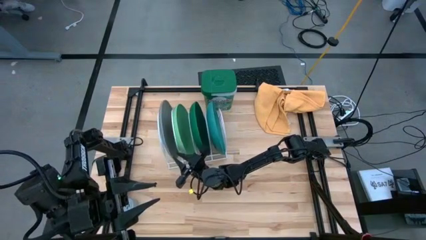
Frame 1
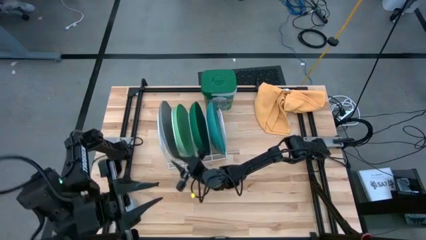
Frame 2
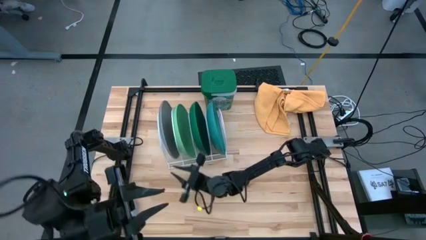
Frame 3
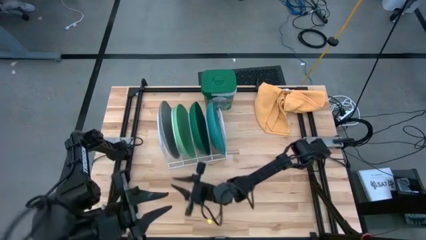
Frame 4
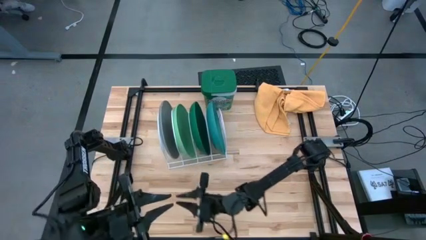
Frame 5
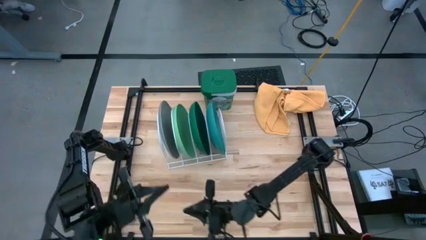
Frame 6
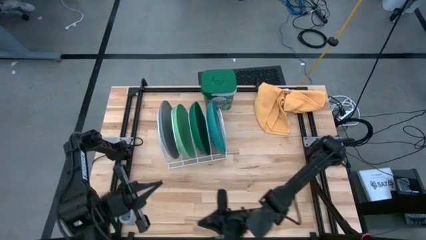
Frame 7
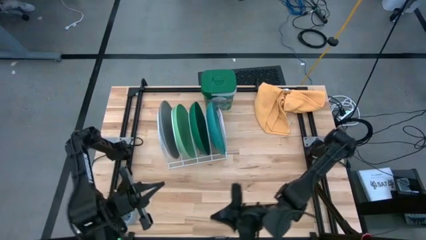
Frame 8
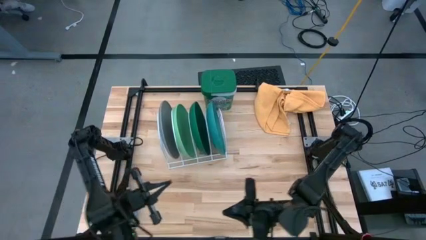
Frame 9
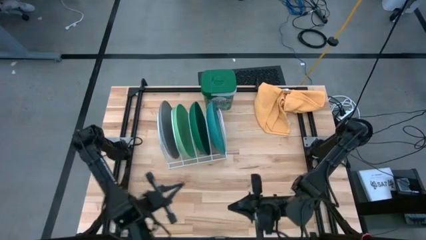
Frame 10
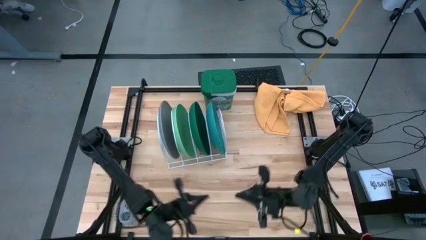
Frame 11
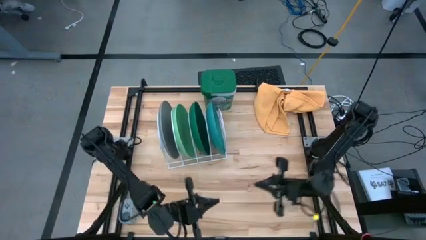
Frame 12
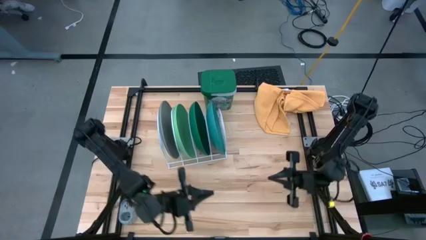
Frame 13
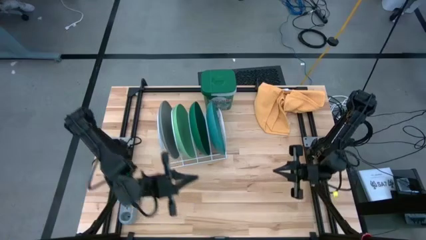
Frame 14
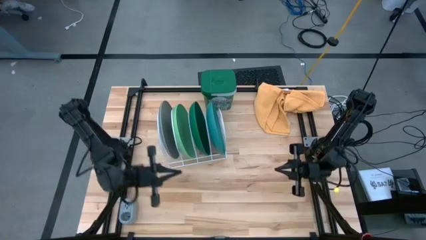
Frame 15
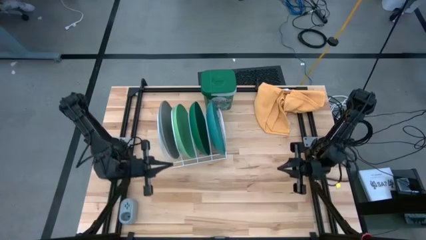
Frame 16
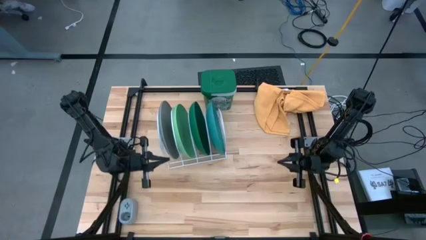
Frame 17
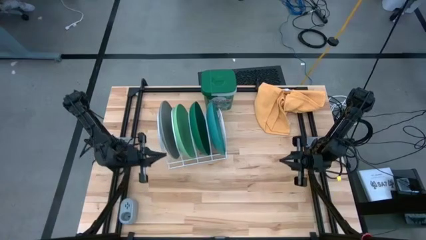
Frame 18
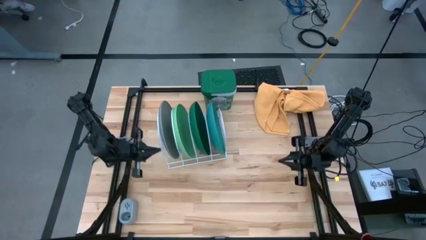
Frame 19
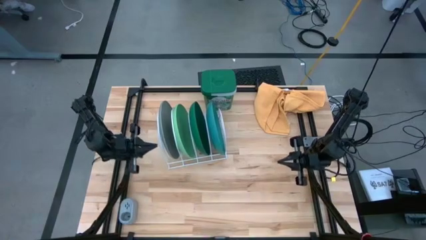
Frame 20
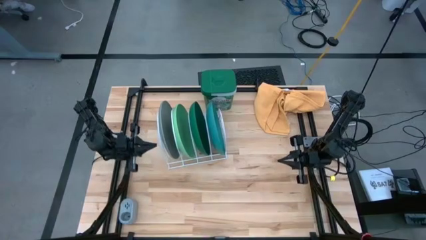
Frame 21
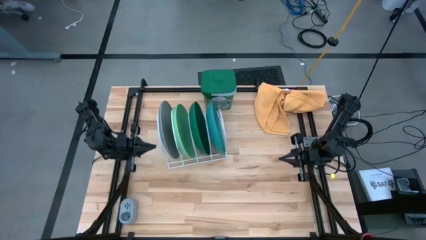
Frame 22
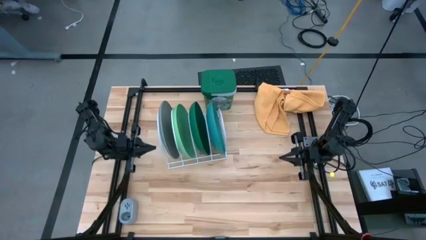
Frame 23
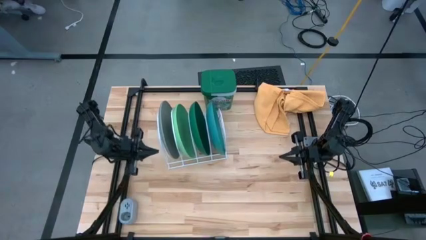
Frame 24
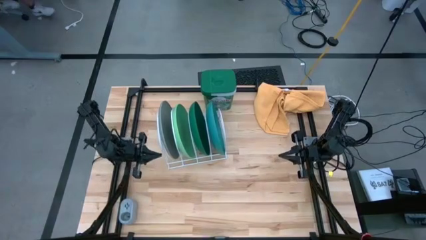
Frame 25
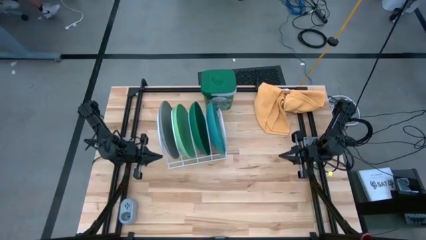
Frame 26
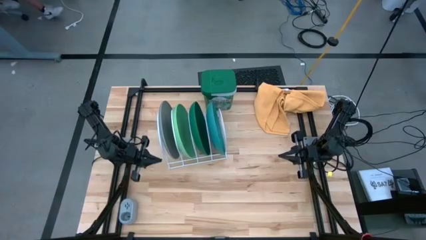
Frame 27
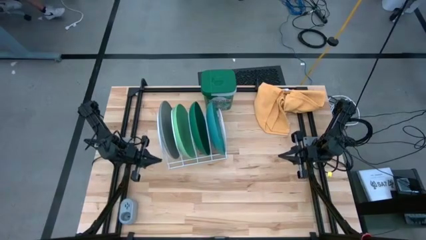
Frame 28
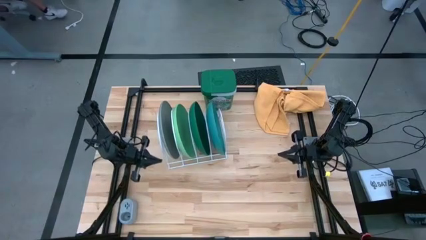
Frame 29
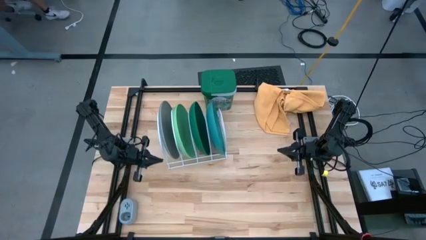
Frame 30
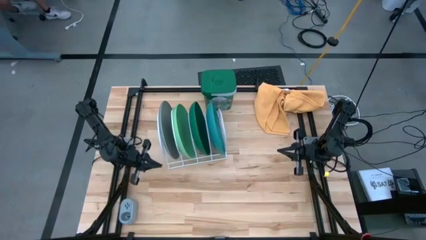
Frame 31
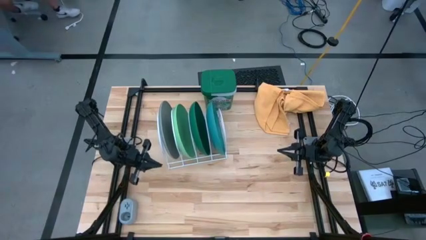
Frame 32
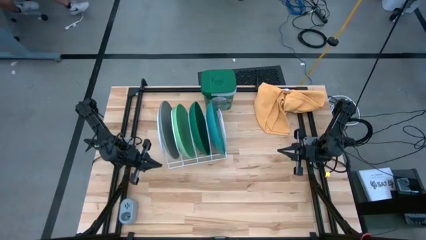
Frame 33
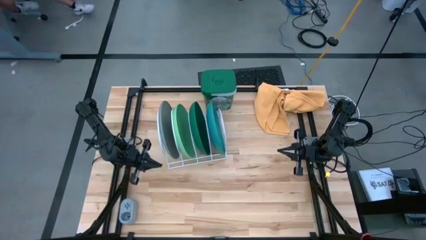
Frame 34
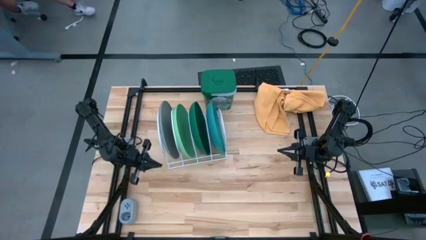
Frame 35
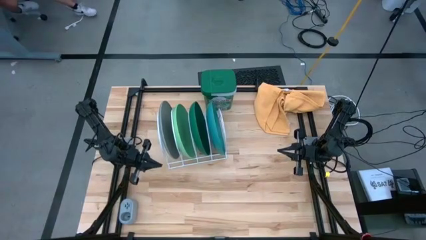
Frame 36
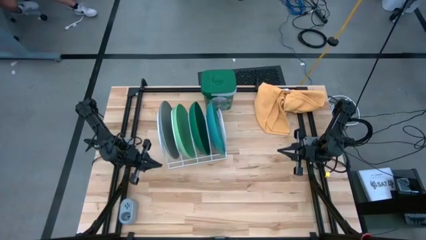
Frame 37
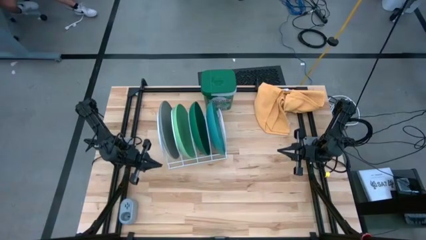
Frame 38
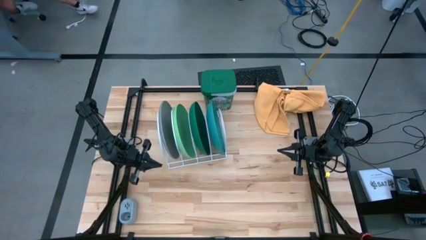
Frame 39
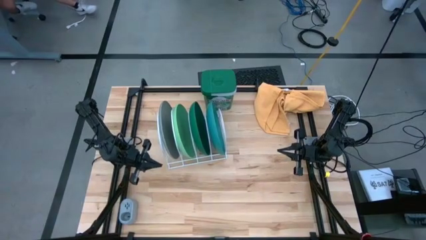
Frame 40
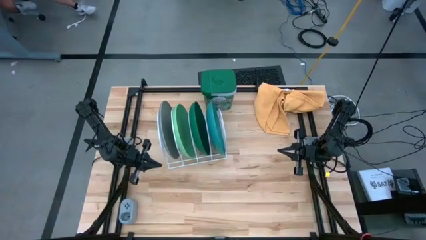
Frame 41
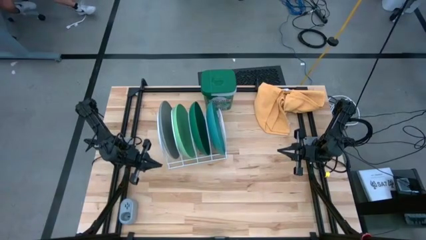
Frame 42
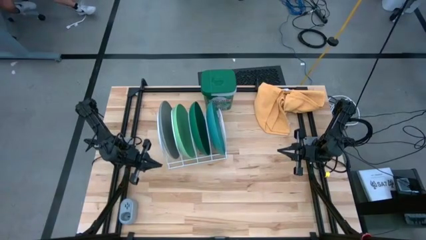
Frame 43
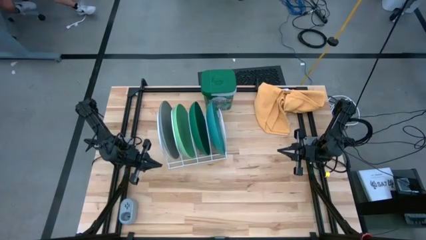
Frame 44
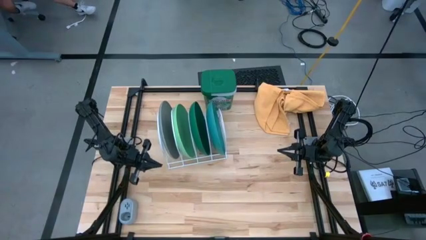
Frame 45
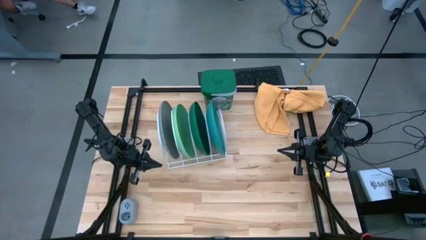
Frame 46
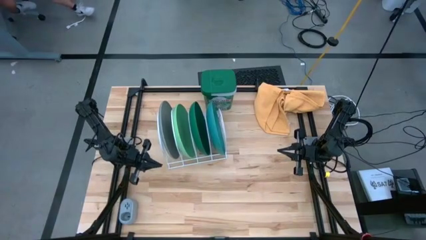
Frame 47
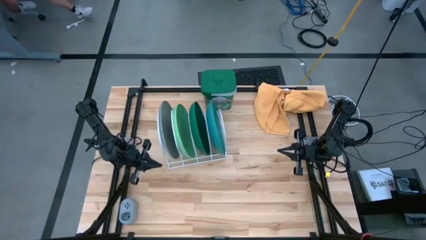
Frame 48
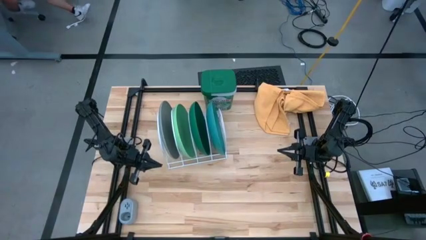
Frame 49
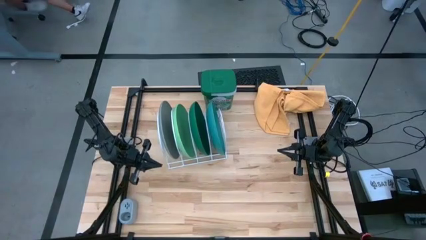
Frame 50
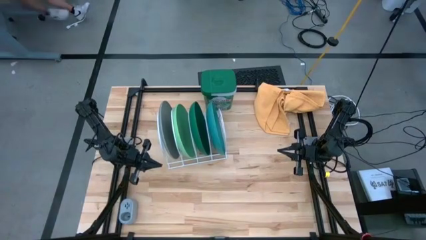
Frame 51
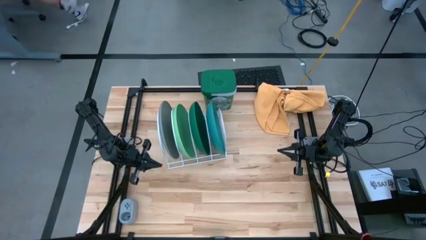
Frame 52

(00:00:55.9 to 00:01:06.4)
Task: Sort dishes
Return to Home Position

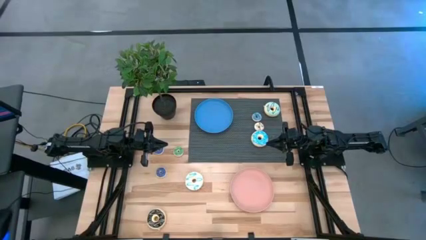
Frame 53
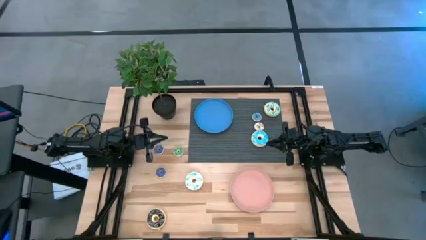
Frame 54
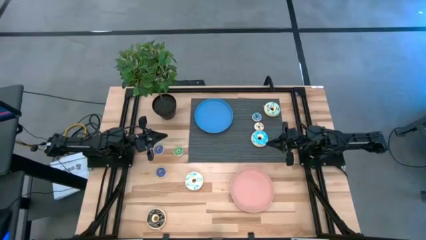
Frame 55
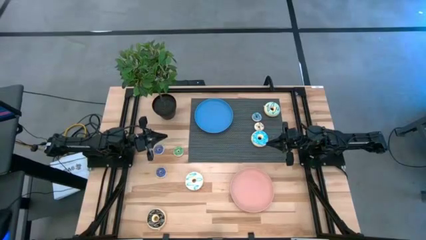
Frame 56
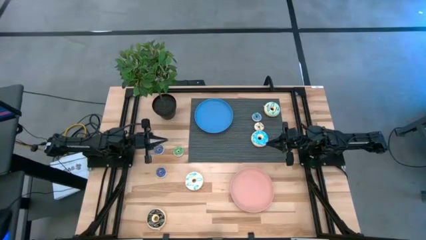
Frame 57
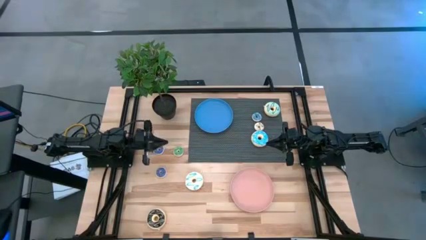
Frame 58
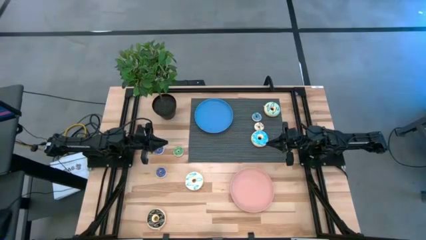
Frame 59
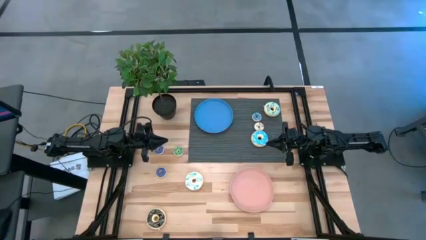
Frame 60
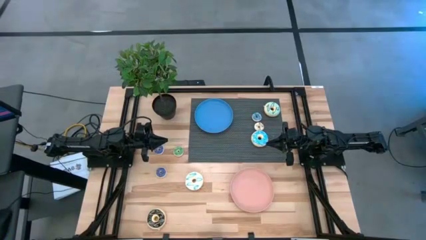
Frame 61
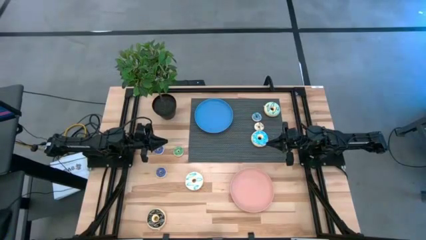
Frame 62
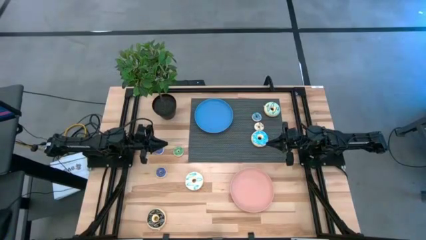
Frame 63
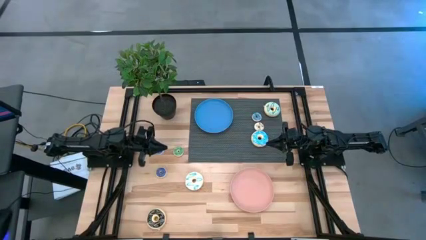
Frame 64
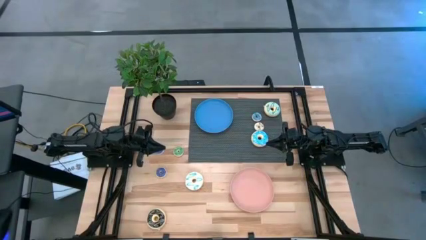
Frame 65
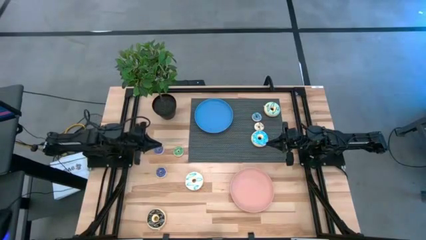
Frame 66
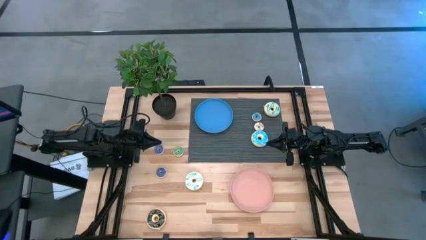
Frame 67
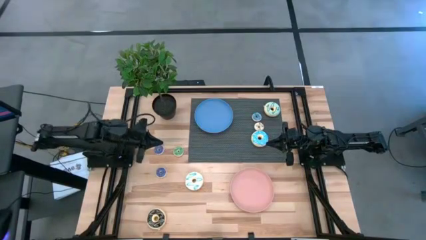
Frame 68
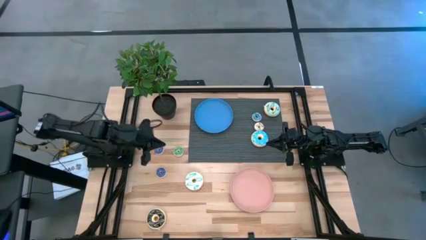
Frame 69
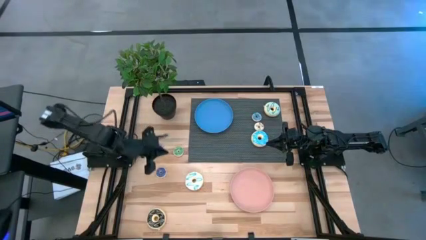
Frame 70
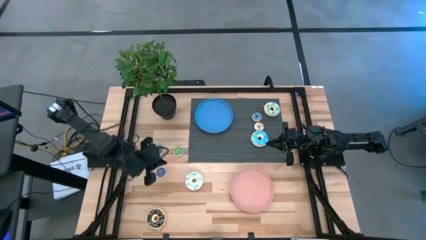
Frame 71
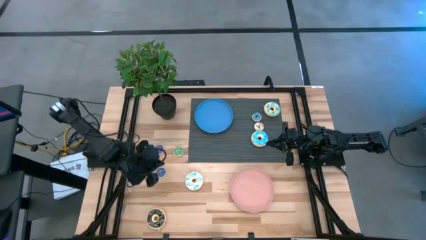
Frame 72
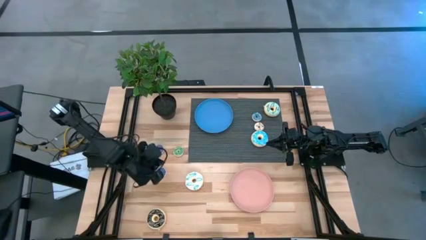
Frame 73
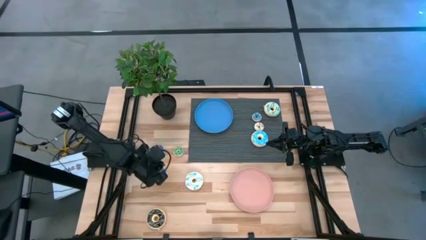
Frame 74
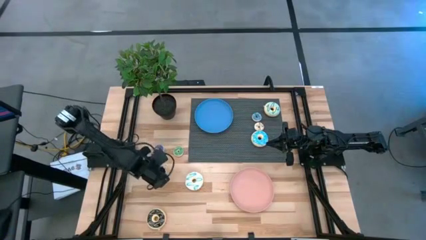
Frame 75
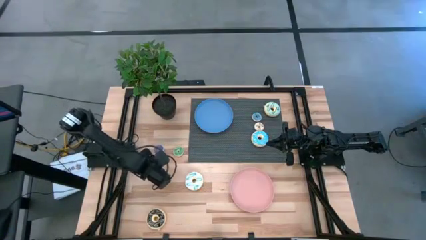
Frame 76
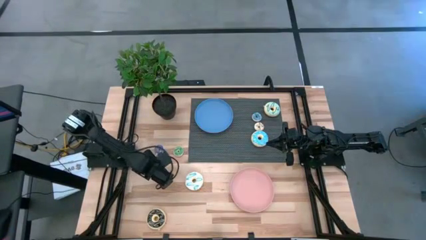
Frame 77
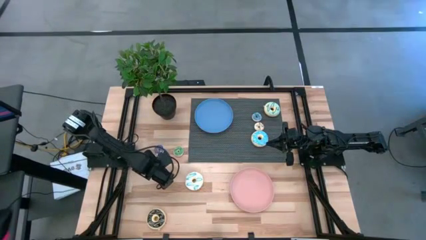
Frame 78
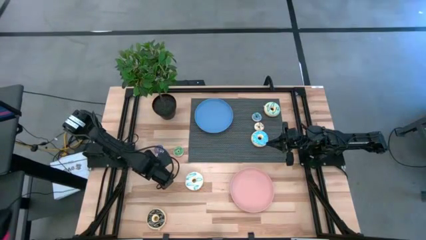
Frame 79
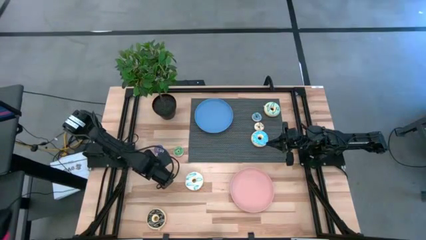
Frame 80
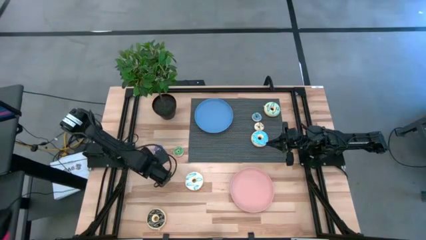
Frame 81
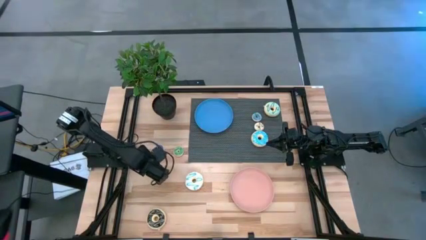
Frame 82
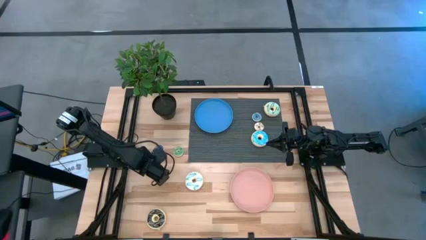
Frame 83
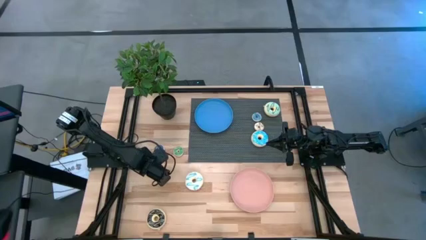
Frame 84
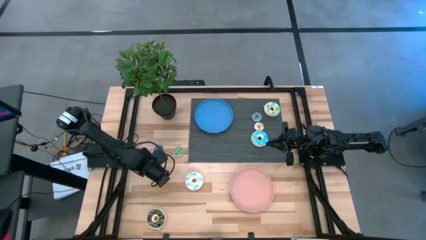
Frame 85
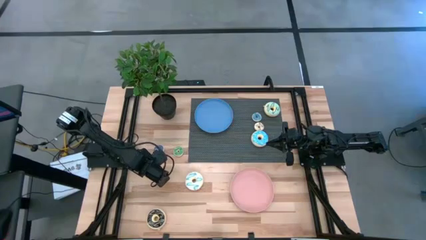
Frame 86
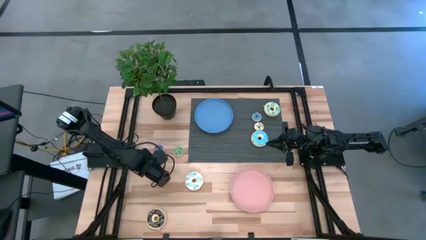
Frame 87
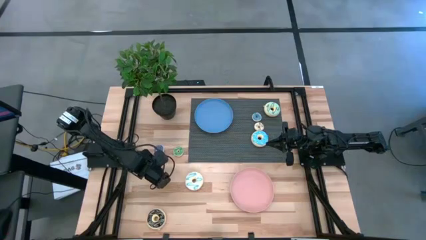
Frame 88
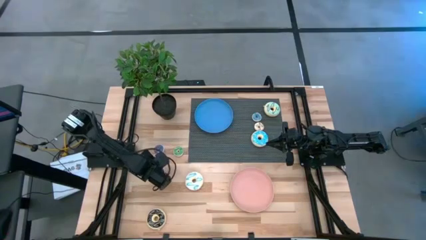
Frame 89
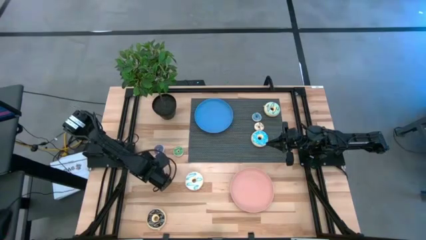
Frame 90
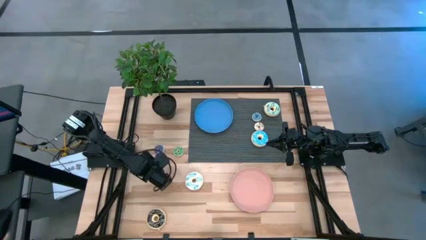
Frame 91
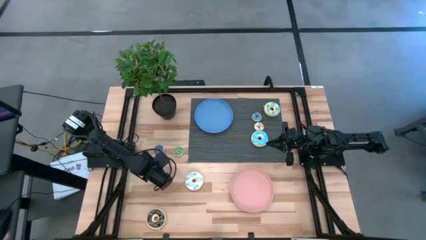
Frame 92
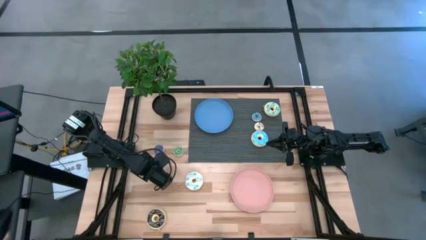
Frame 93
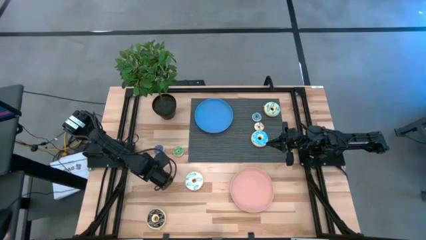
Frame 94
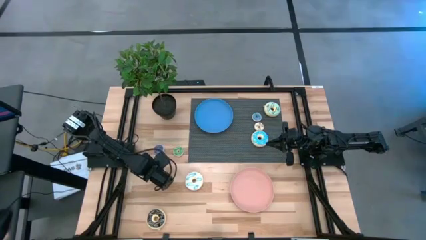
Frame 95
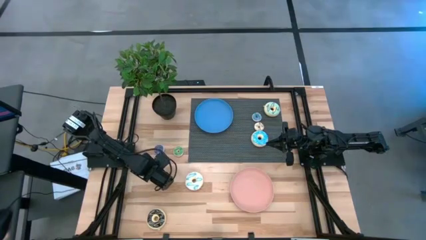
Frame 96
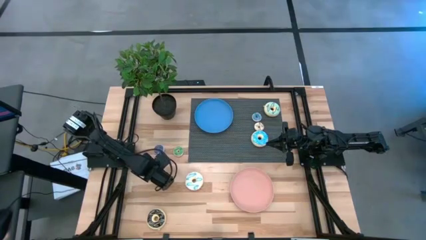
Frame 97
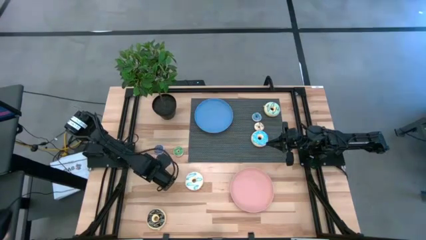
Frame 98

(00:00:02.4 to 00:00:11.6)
Task: Pick & Place donuts
Put the small blue donut into the blue plate
